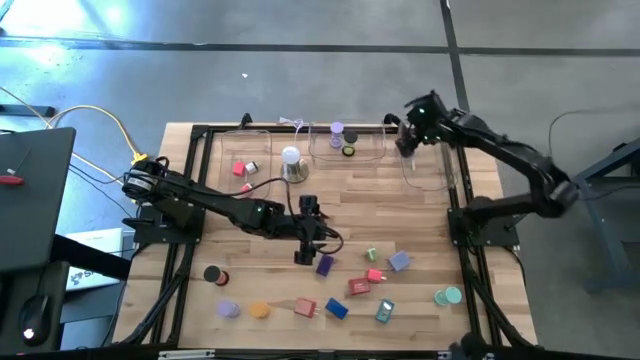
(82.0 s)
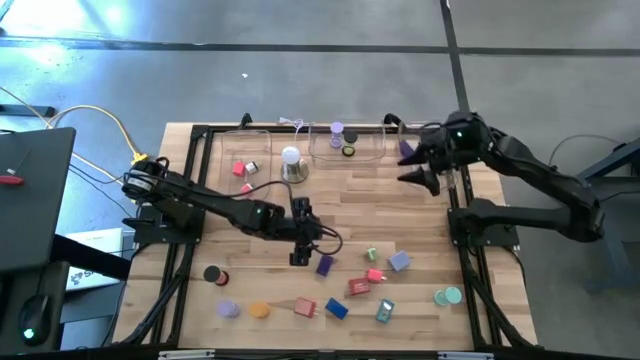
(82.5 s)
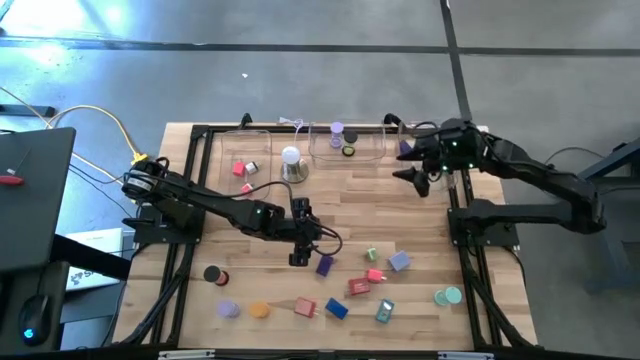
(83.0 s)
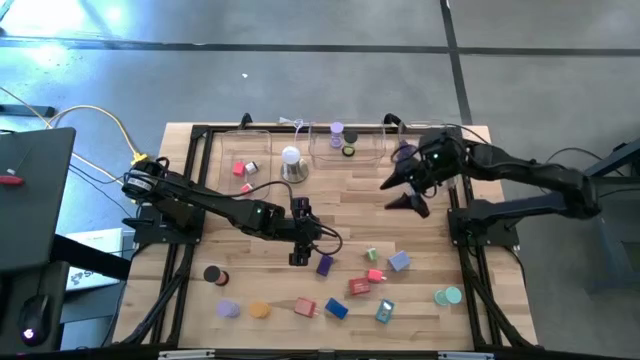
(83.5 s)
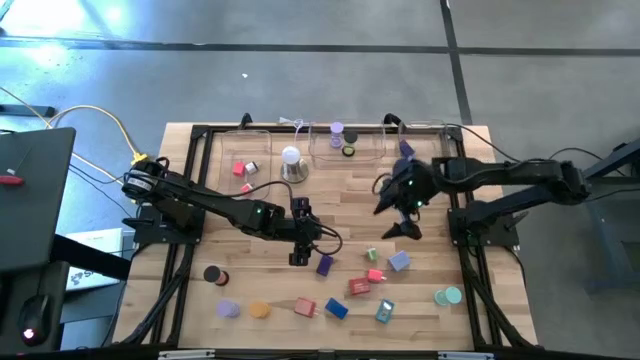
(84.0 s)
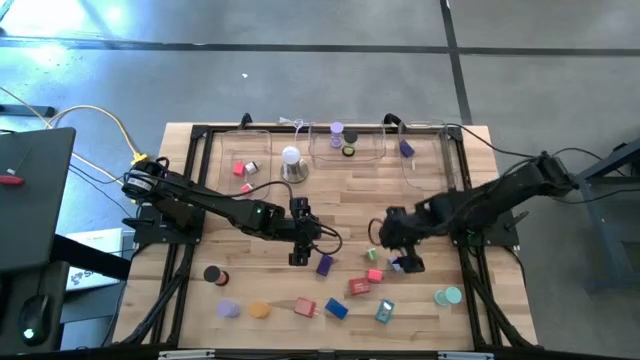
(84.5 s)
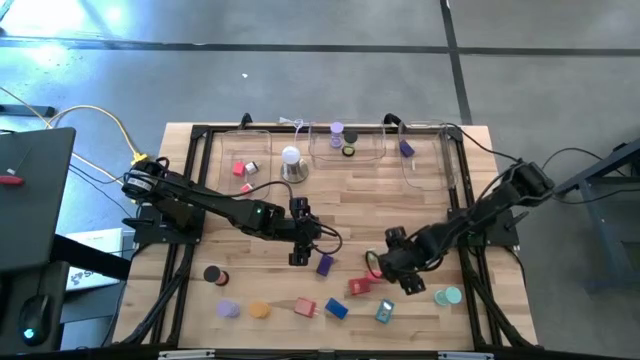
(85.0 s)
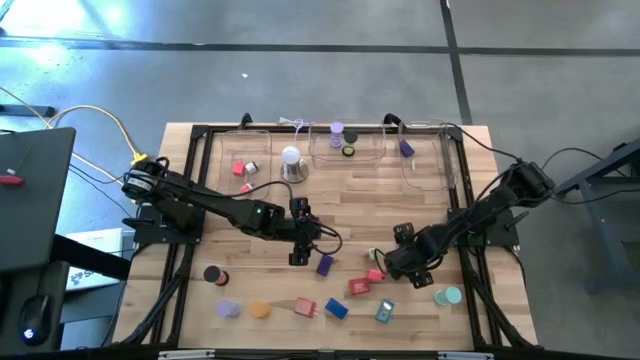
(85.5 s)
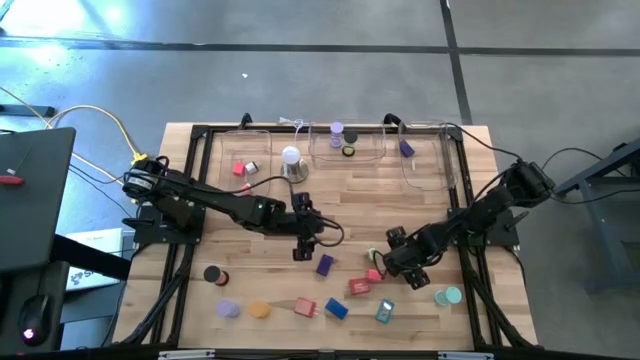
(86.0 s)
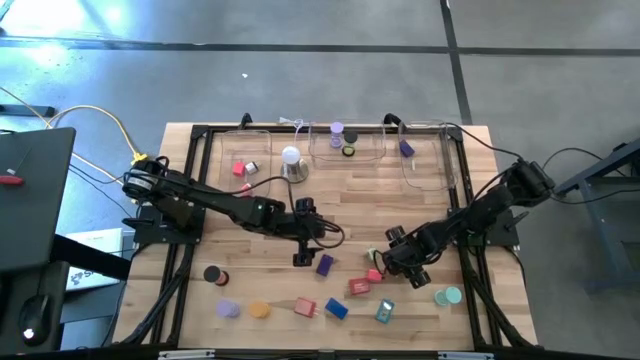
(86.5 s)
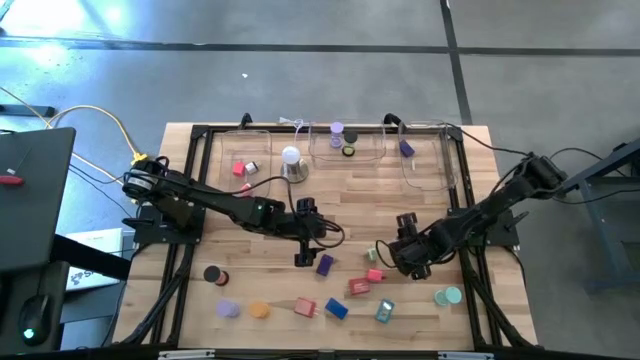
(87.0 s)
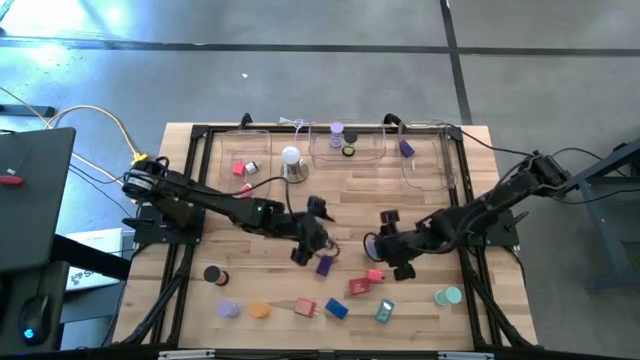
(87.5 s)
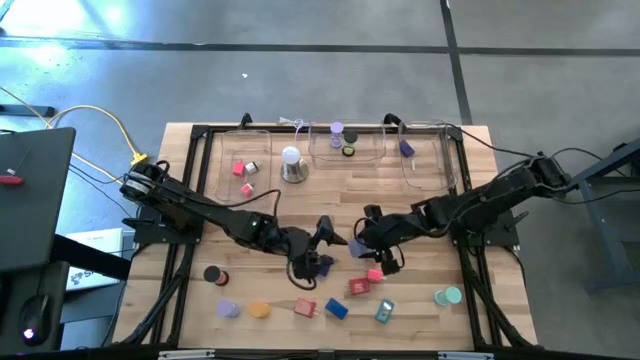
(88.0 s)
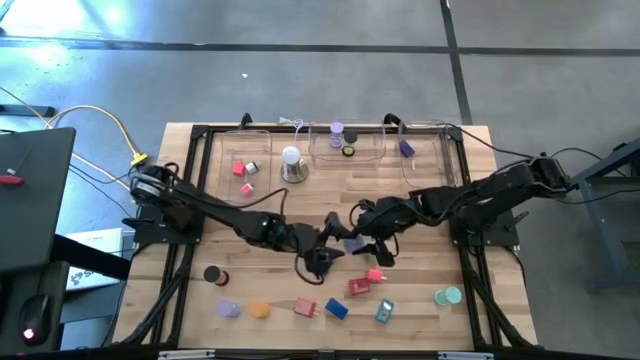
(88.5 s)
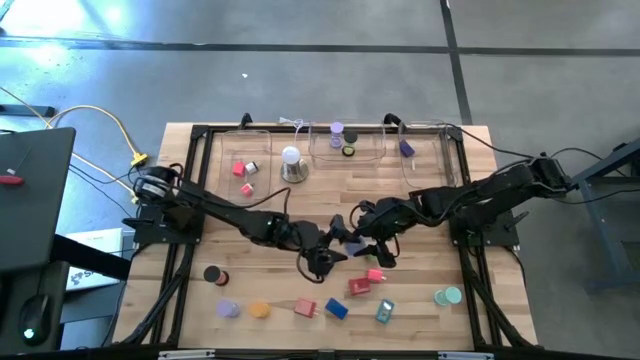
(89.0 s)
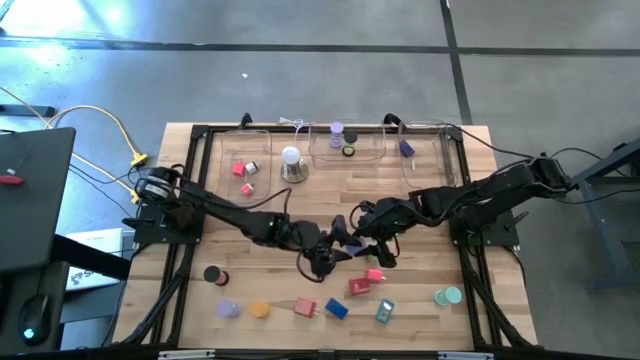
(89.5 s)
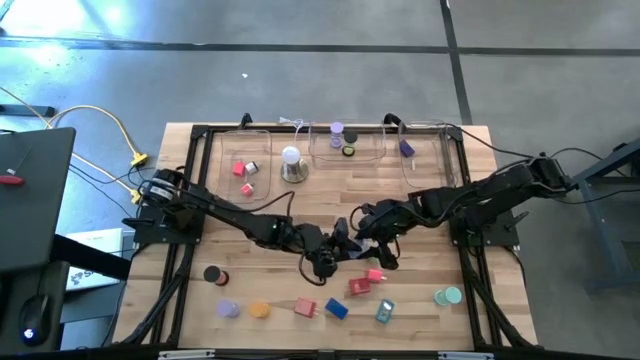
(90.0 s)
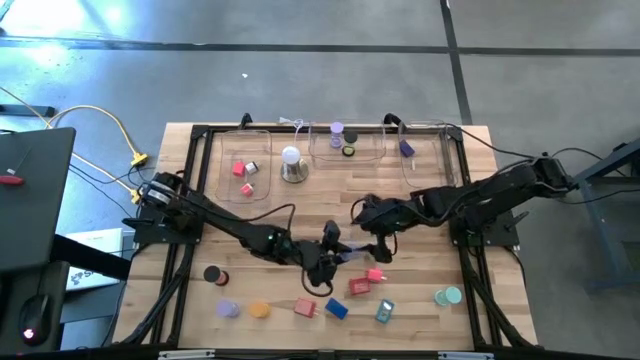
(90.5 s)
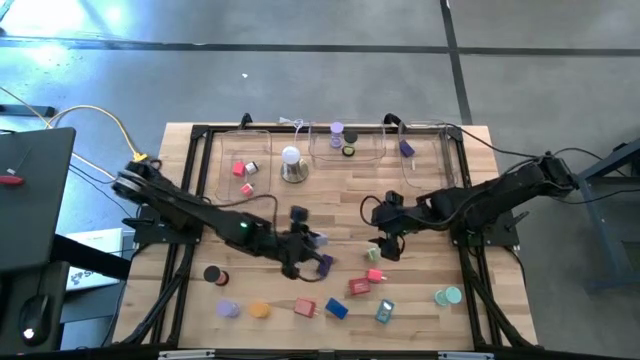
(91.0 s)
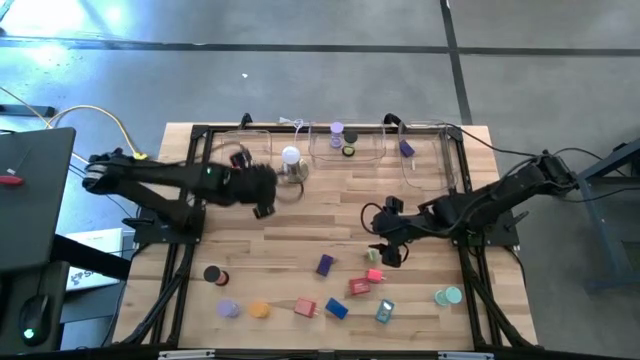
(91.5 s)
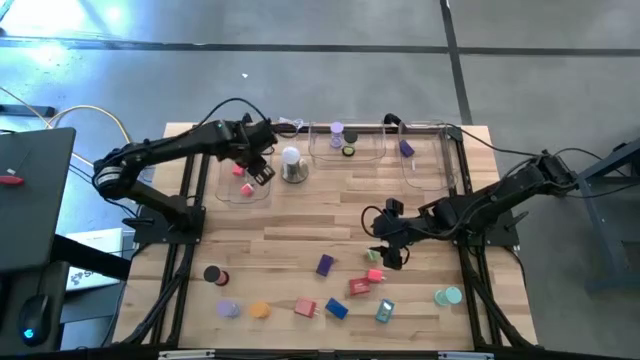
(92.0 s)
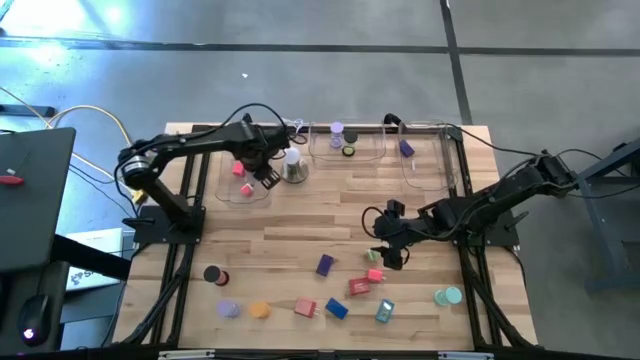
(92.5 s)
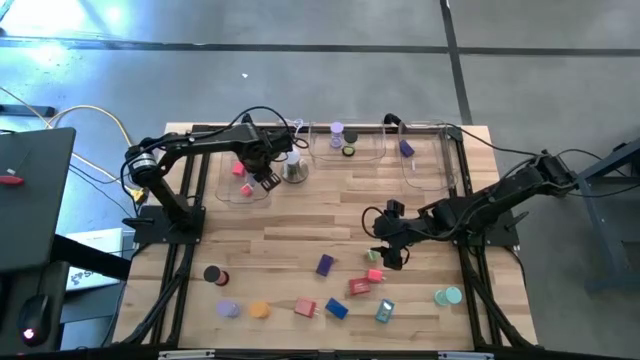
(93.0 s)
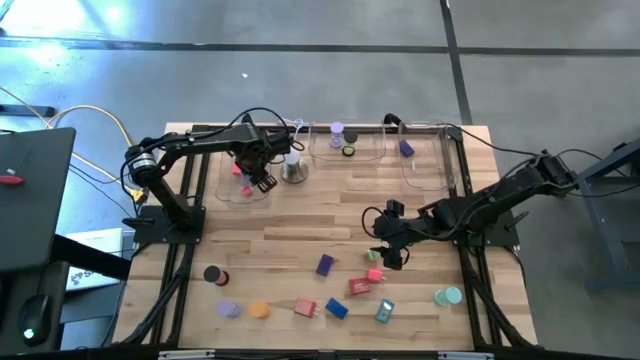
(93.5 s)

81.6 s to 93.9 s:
Task: Pick & Place Office items
Put the light blue charger adapter into the left transparent bin

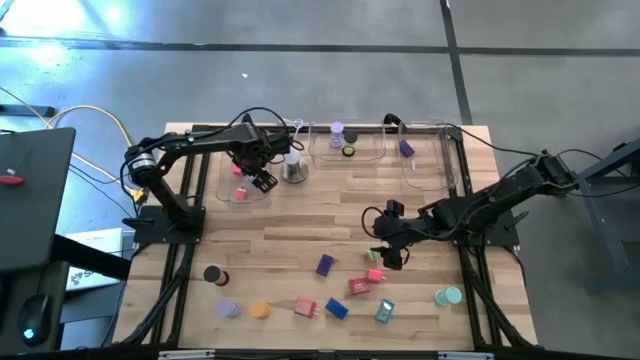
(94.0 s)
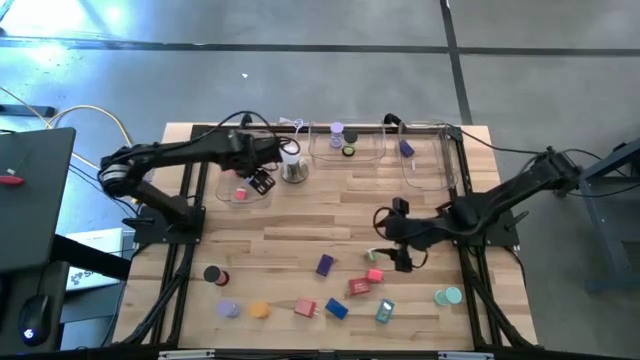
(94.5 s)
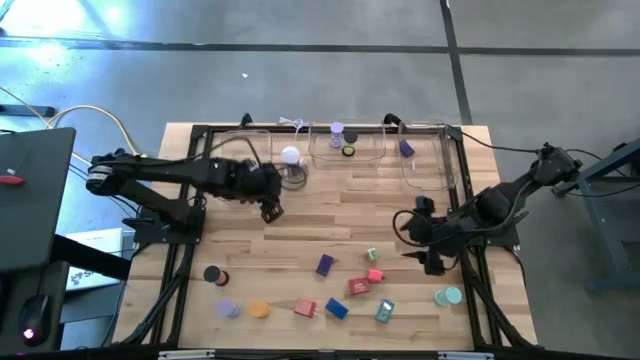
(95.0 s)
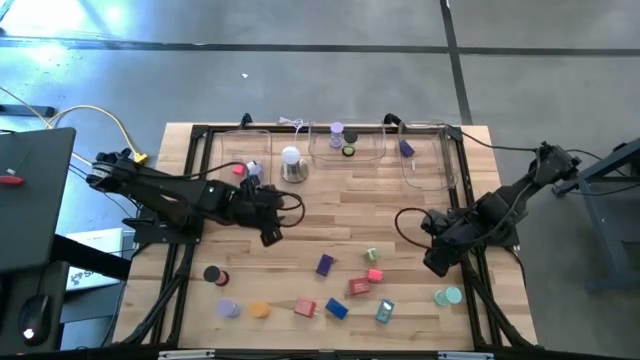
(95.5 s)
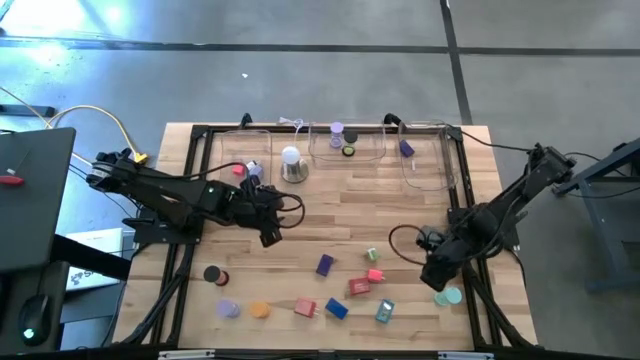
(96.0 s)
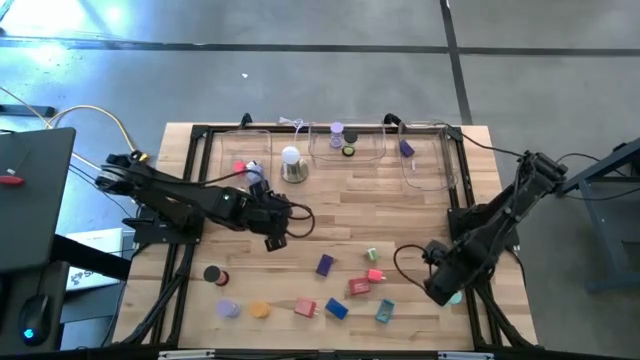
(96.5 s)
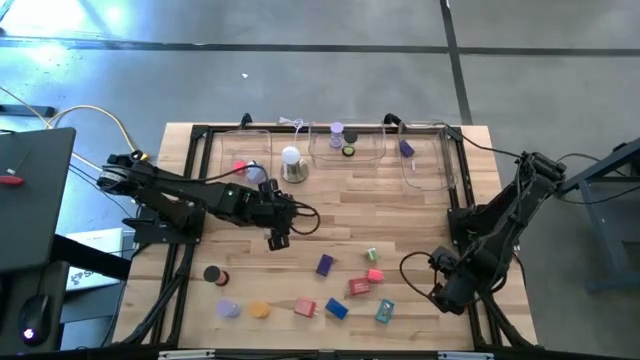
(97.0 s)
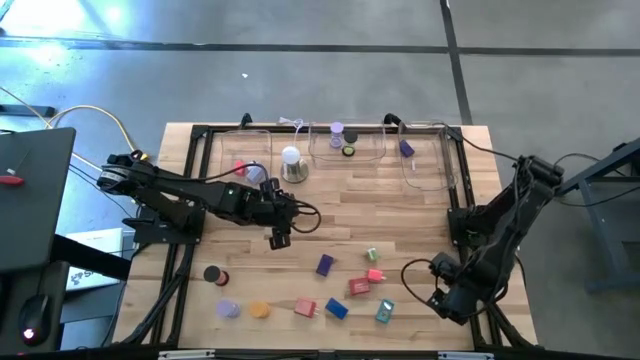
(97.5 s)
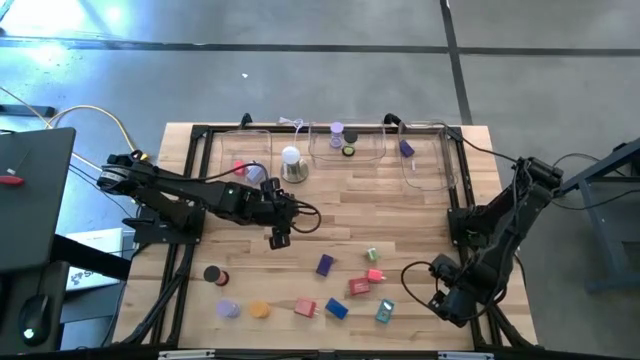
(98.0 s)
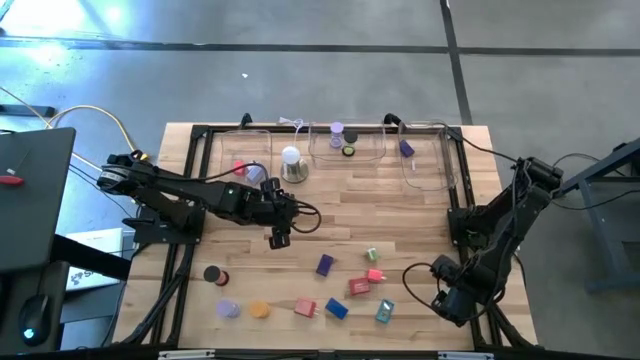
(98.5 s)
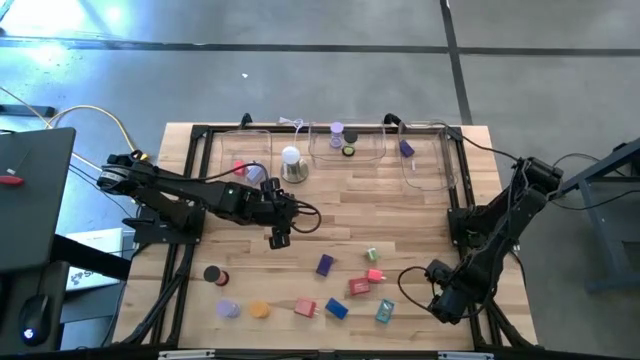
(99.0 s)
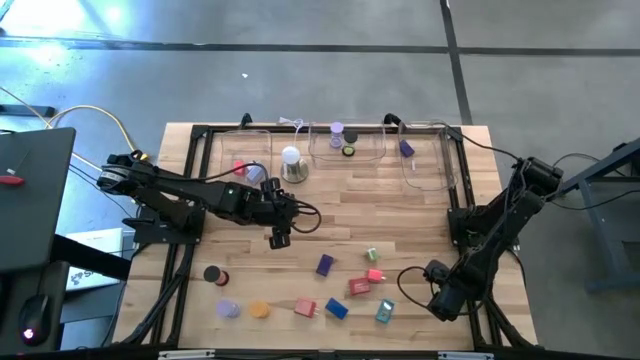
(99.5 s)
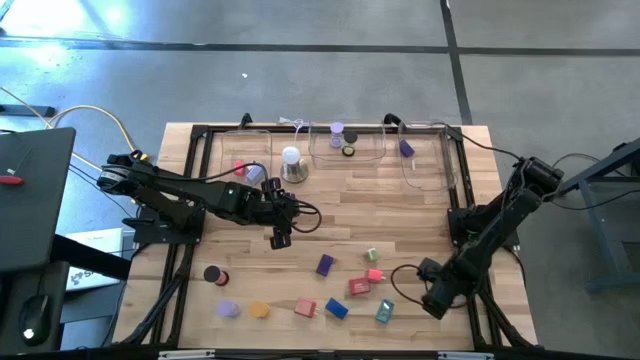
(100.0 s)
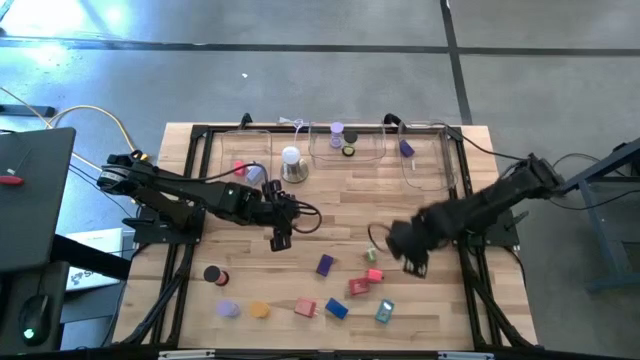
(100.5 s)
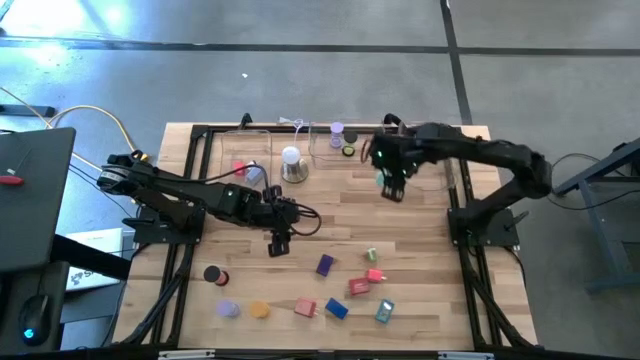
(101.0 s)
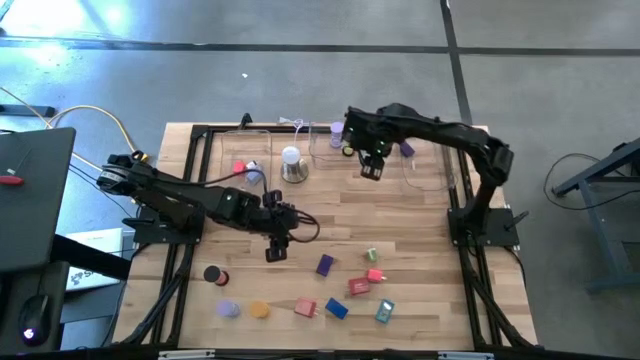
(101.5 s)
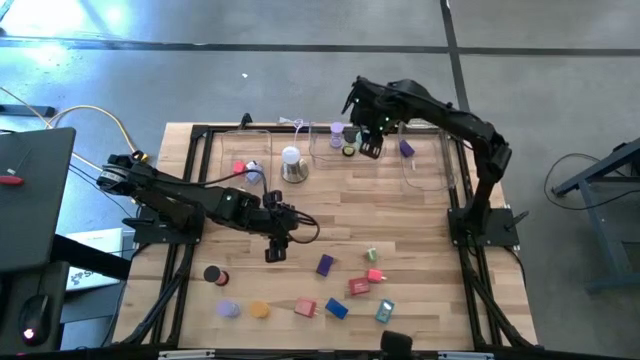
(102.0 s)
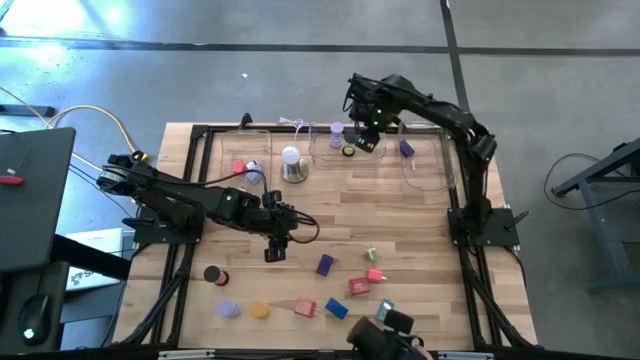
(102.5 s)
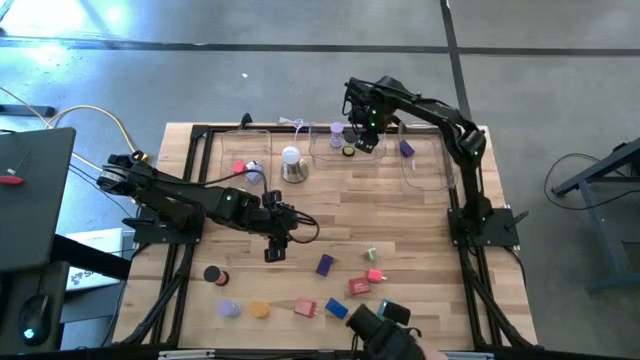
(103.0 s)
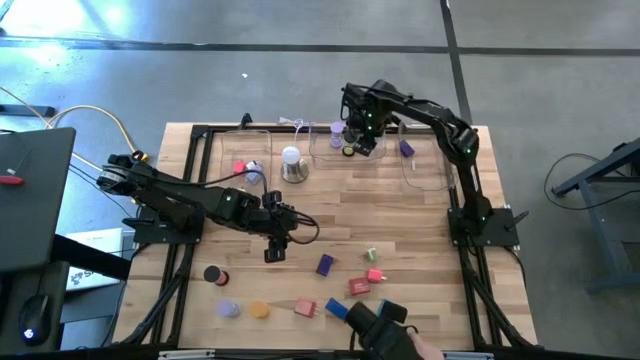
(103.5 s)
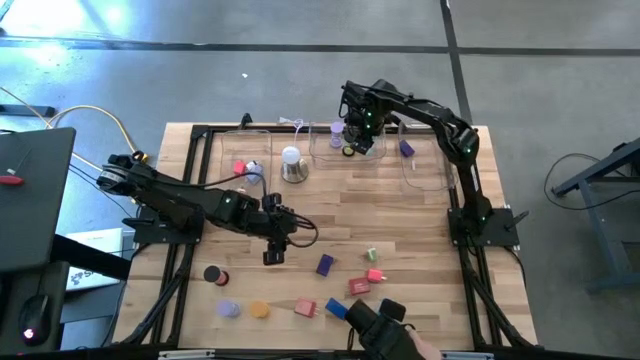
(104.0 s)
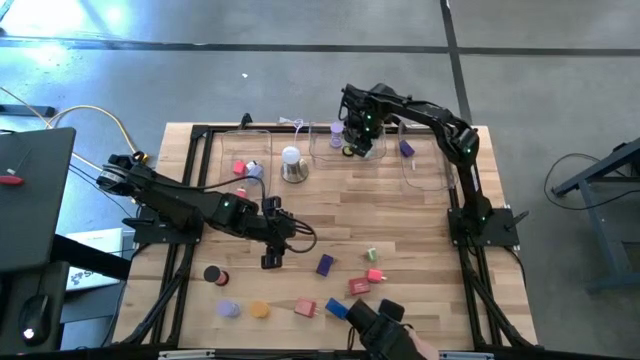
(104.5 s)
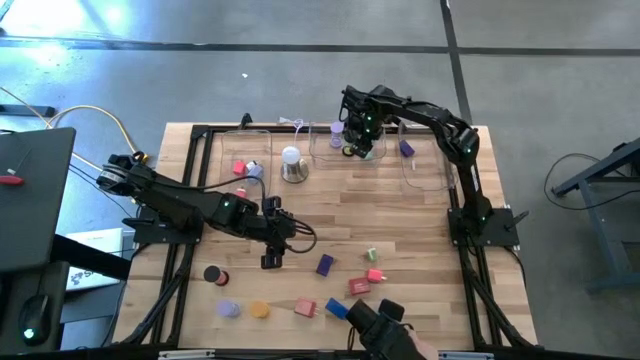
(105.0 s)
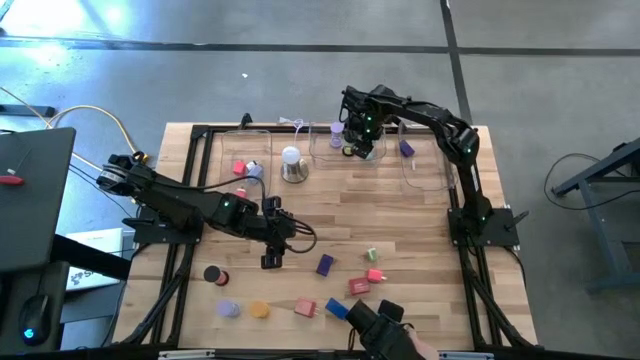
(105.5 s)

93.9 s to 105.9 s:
Put the light blue hourglass into the middle transparent bin
